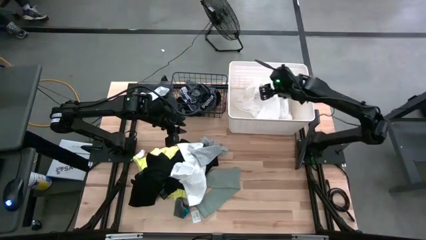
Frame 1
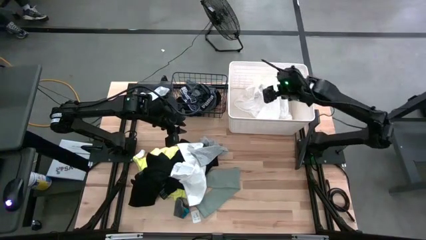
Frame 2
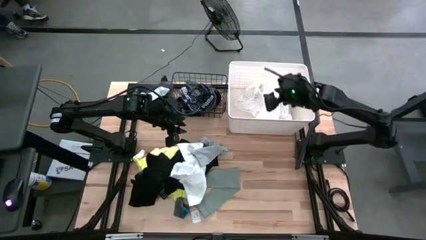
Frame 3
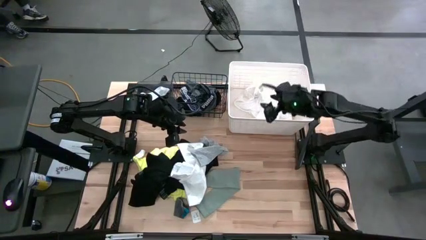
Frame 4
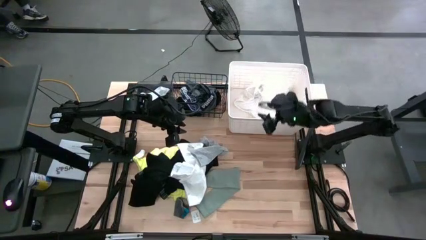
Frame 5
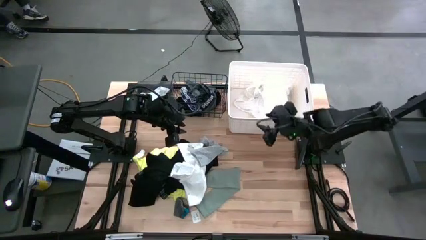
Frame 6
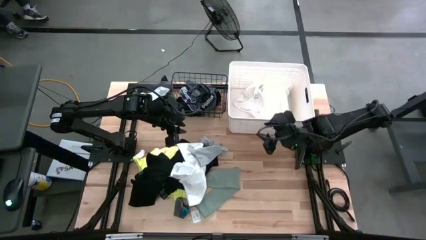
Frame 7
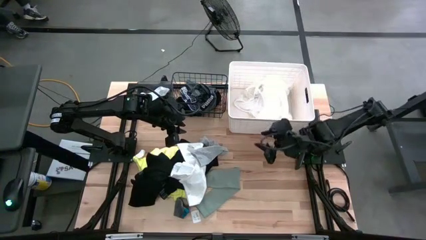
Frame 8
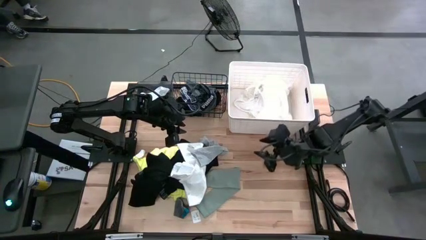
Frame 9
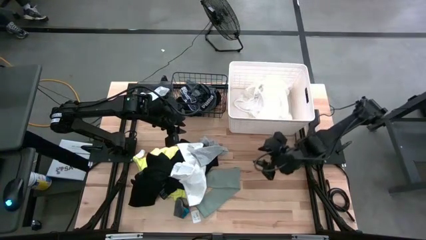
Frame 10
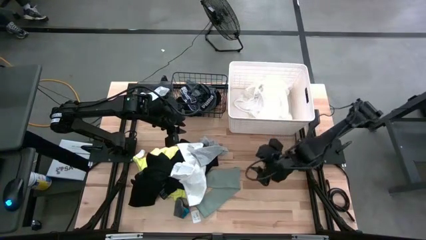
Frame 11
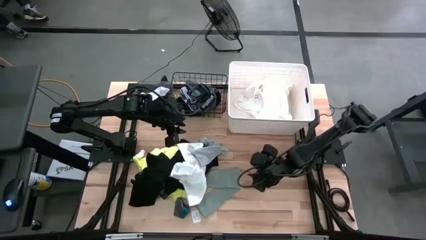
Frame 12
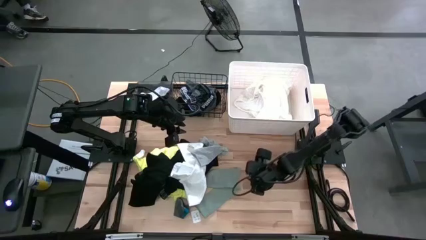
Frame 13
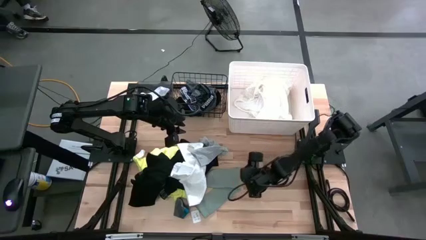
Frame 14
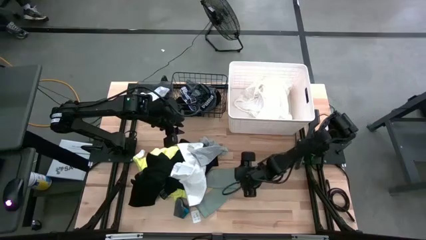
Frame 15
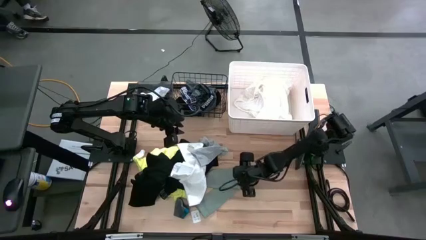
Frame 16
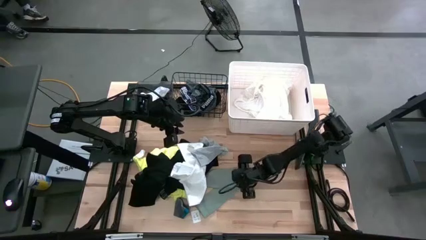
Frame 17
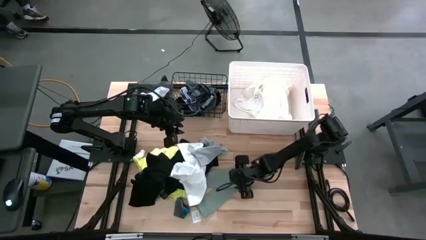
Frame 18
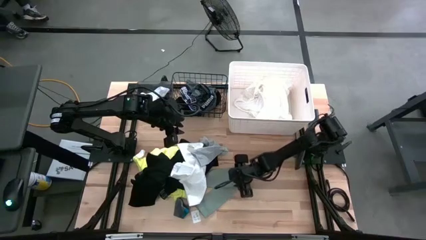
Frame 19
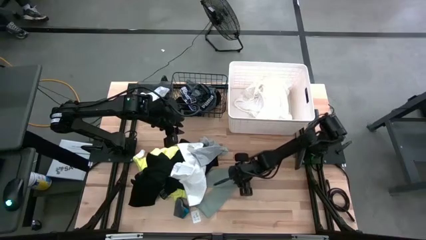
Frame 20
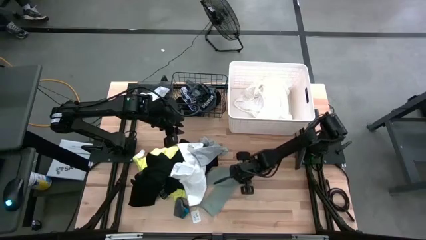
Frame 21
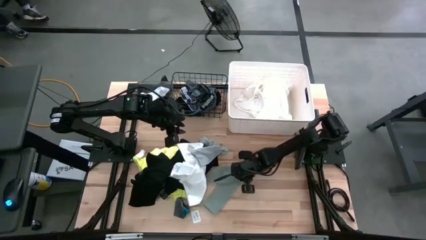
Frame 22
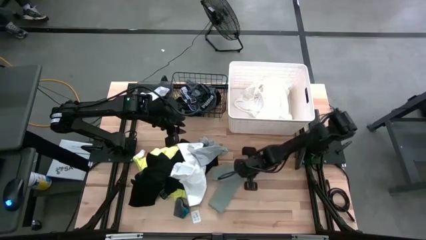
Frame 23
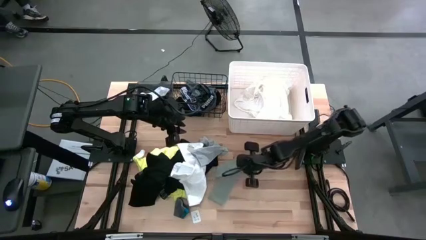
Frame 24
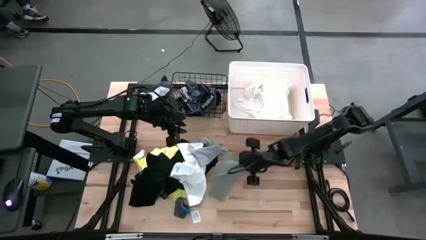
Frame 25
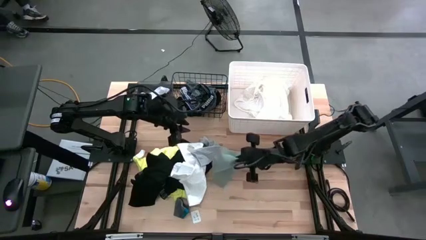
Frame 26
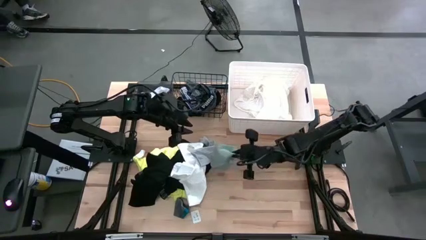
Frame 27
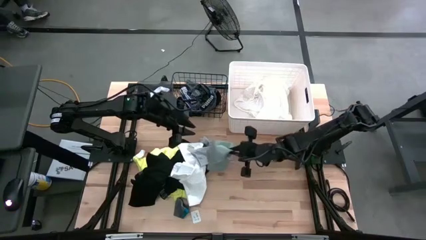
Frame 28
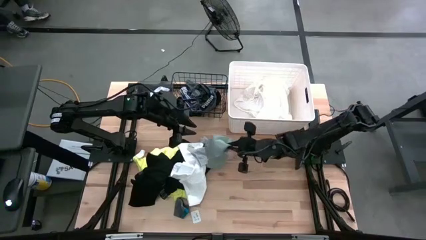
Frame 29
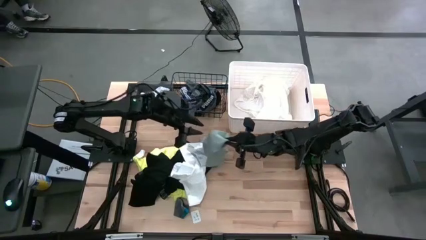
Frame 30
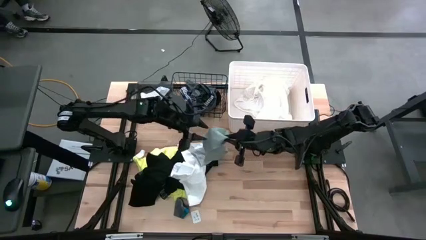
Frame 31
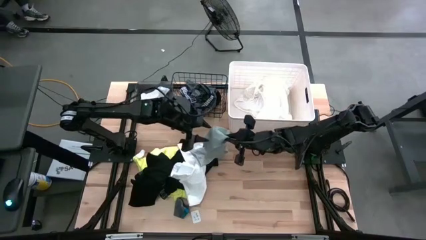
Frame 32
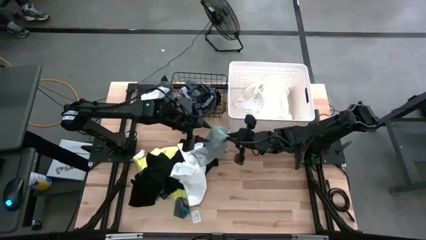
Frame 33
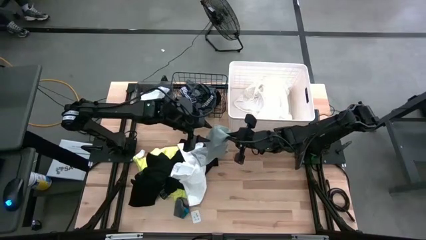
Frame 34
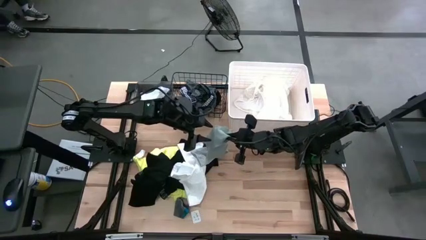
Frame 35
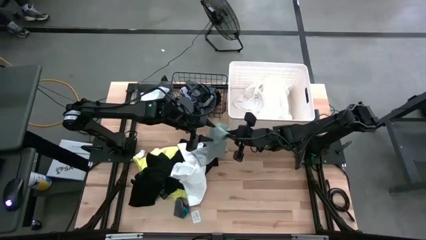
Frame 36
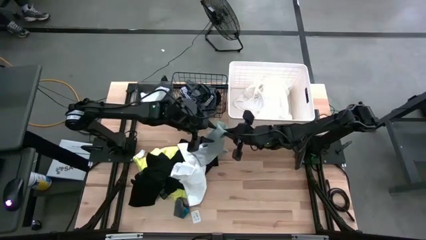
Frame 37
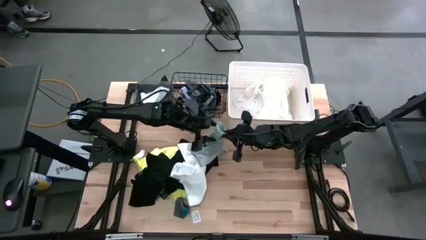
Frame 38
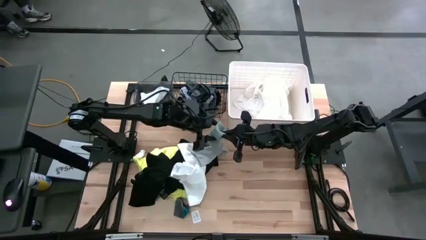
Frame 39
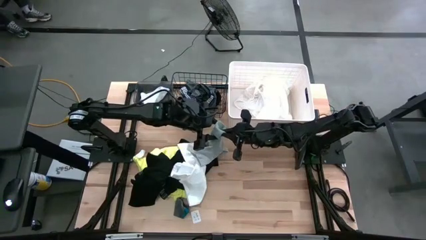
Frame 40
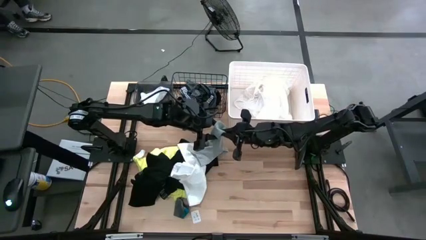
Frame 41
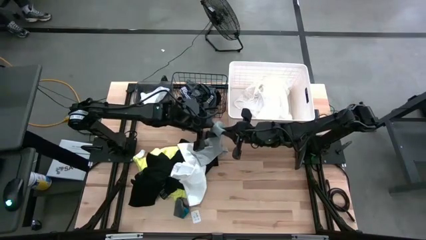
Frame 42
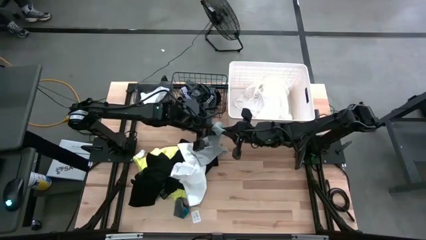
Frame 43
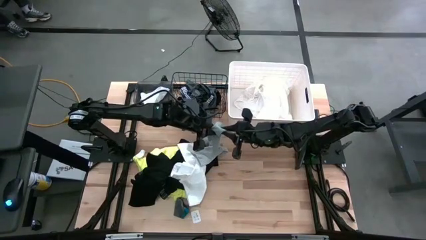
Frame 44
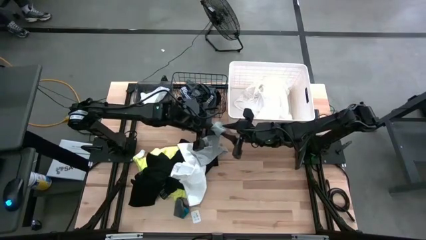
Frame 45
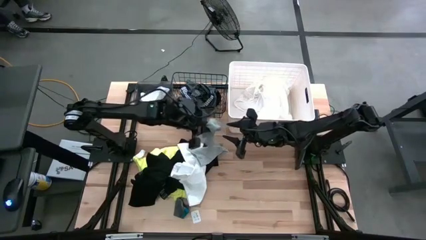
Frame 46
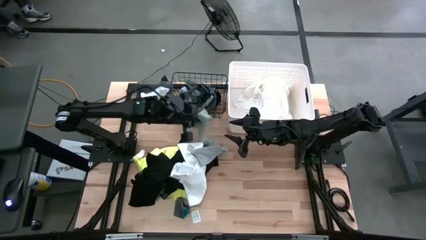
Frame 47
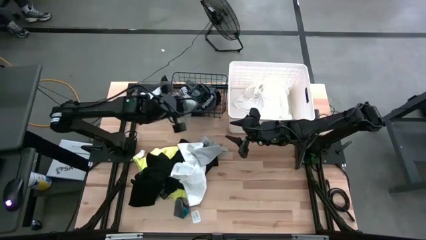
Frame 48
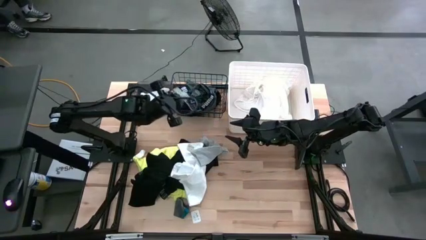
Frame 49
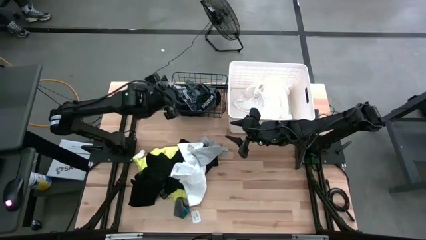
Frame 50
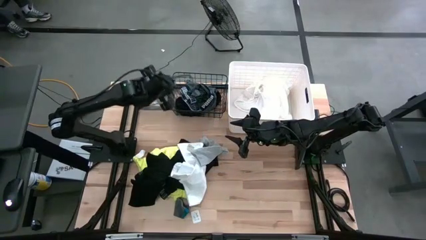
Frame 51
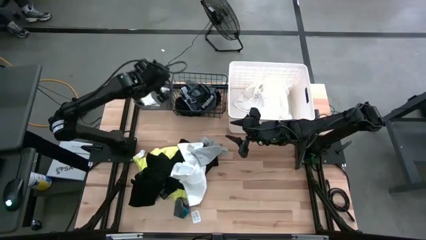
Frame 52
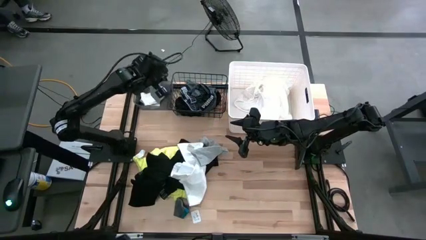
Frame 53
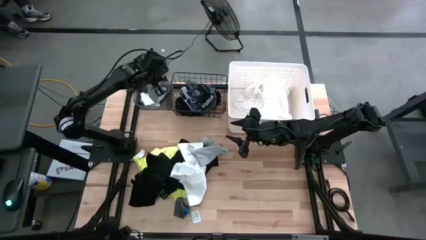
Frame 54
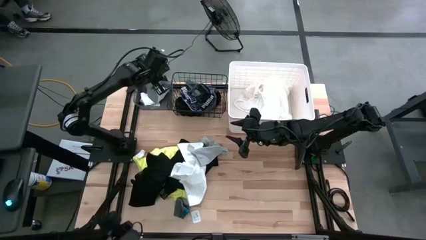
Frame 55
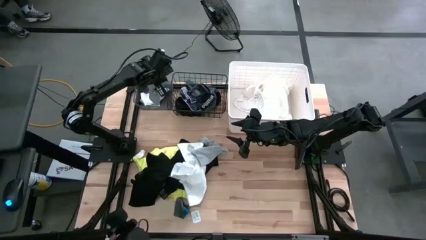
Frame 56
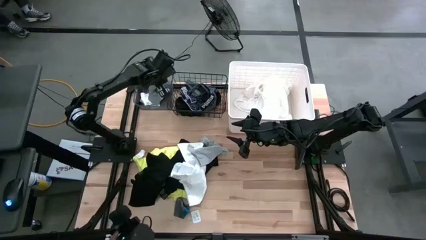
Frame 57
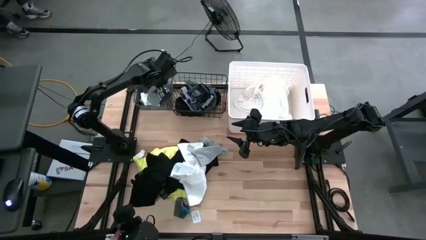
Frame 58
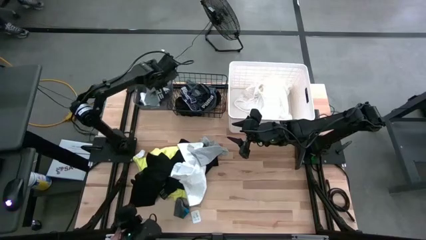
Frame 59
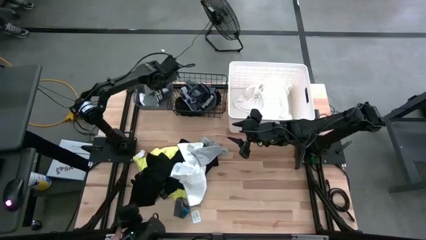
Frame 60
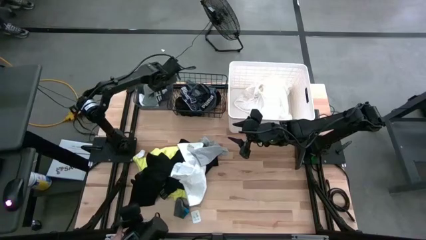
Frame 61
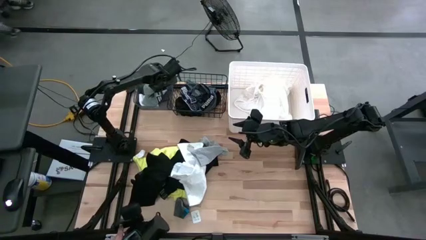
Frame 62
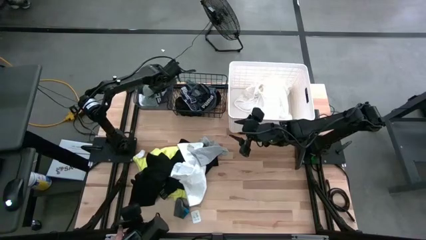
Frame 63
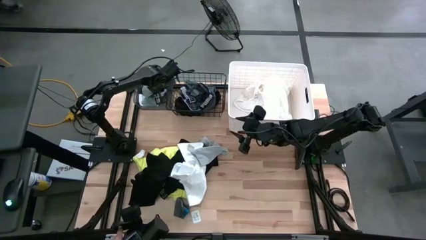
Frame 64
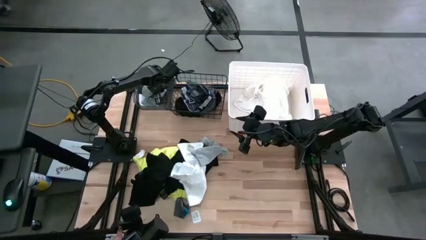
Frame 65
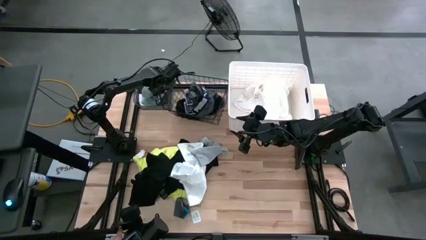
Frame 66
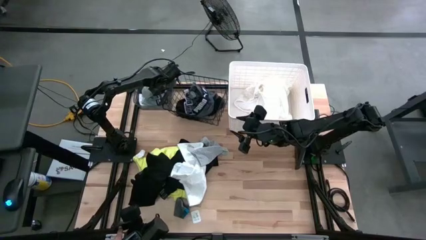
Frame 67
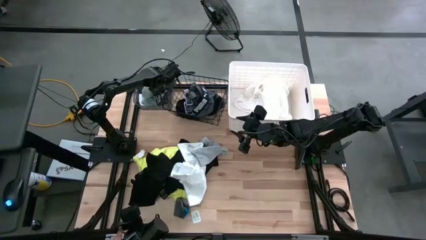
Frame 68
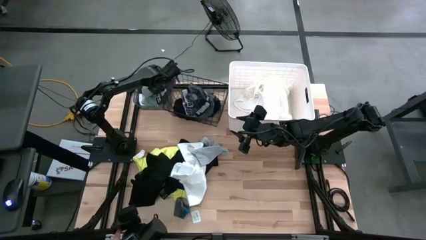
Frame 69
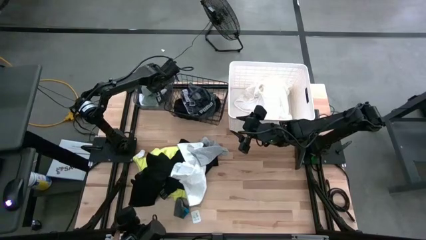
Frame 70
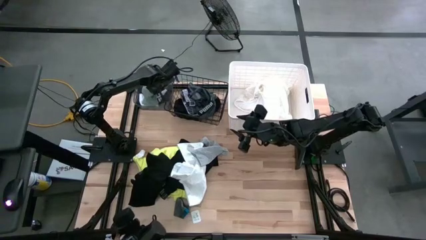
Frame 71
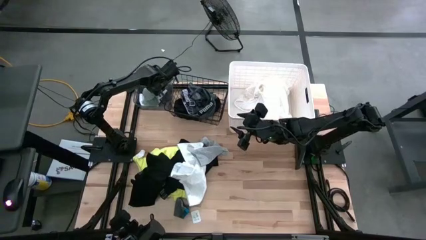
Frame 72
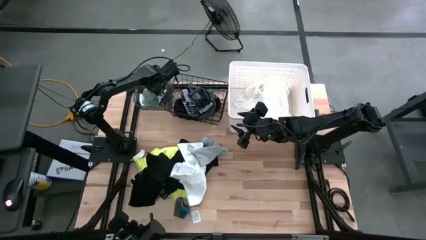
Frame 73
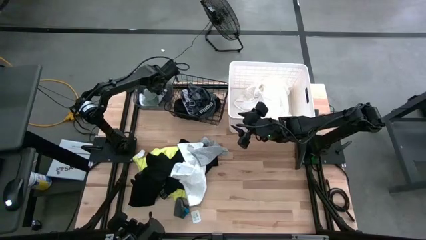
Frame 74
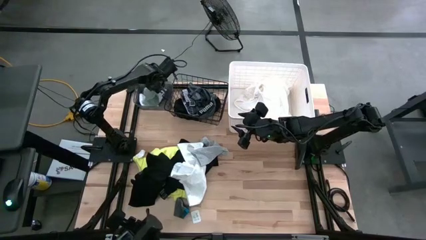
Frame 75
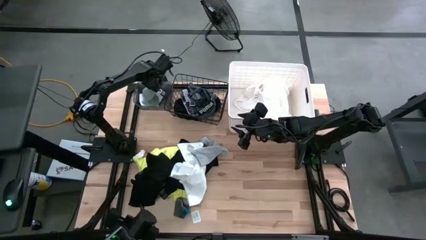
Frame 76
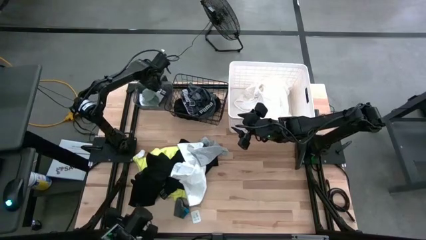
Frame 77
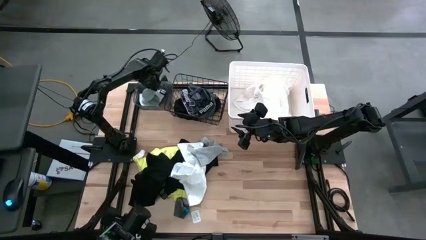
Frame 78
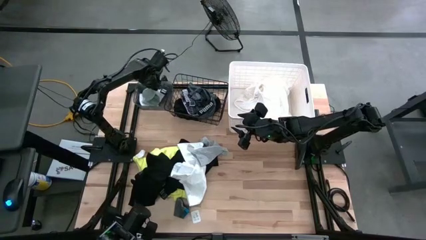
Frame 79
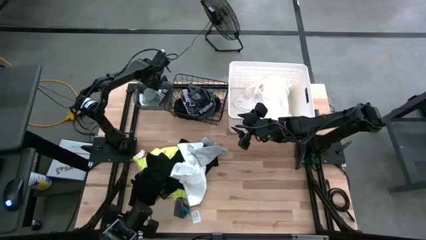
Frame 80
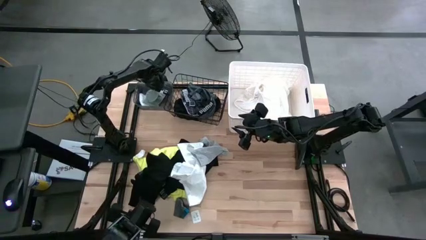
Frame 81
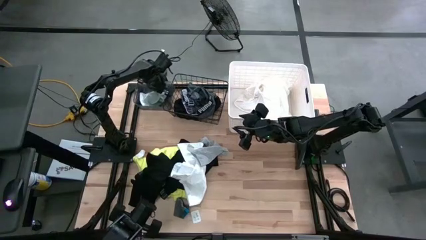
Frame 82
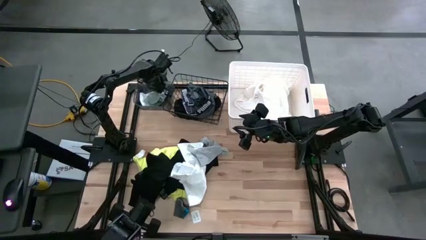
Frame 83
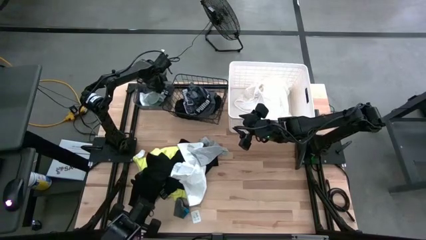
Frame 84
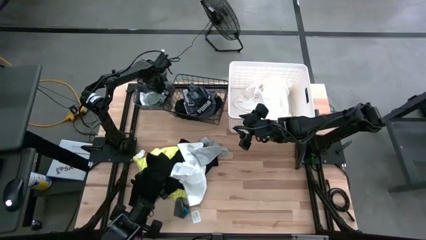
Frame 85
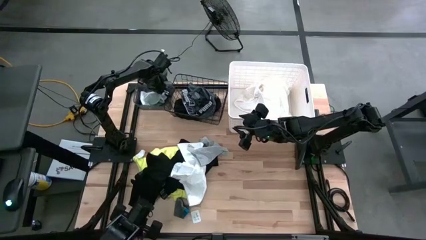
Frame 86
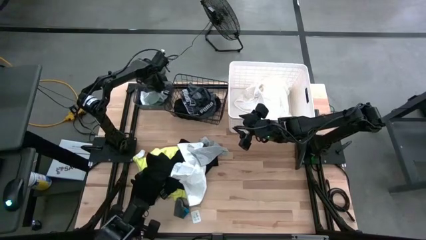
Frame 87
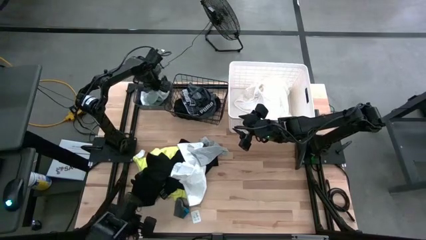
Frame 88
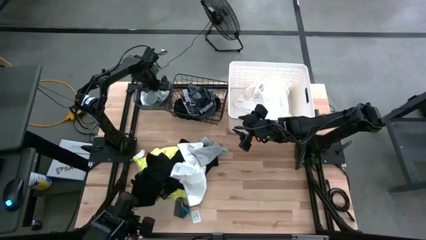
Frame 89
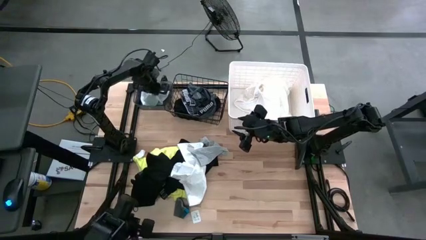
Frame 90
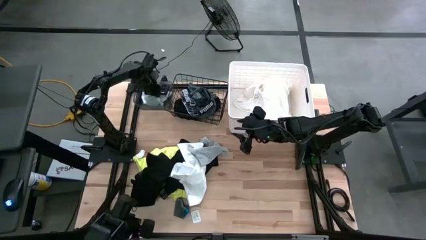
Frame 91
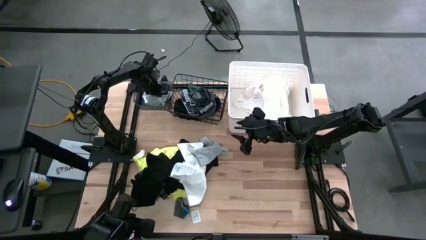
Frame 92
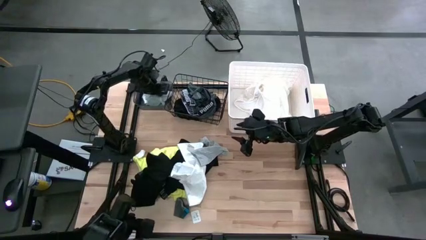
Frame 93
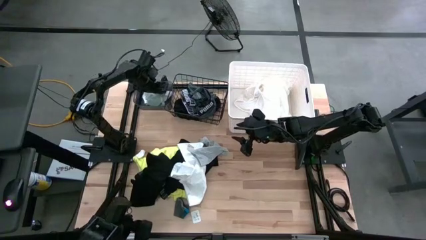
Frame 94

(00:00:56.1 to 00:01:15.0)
Task: Pick & Place Cloths
Put the green sock into the black bin
